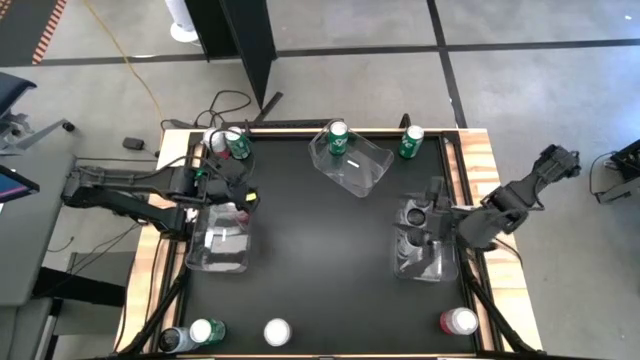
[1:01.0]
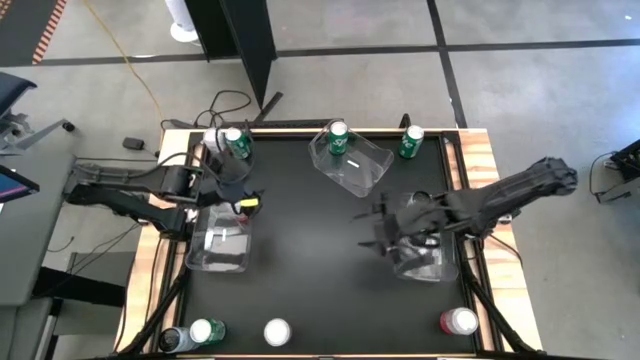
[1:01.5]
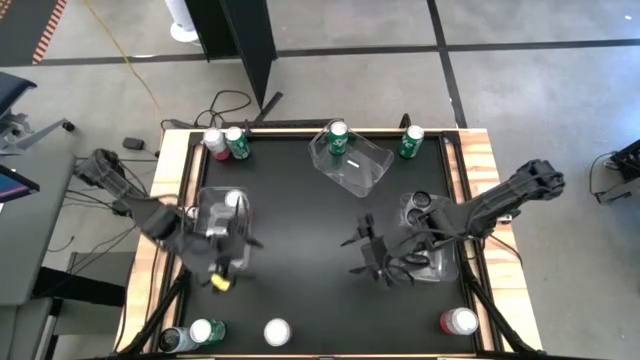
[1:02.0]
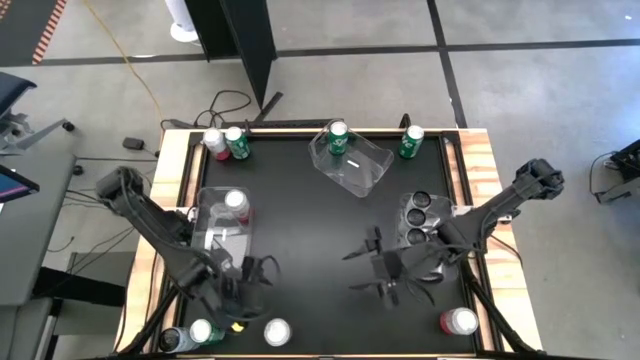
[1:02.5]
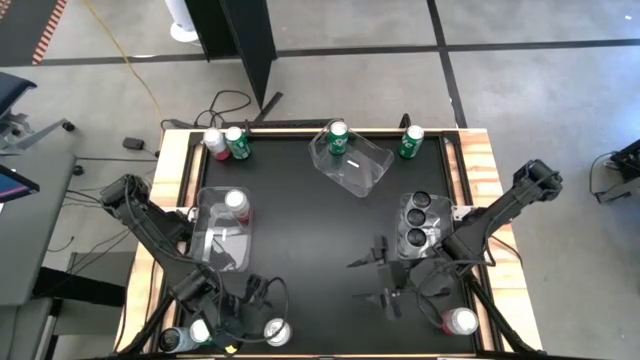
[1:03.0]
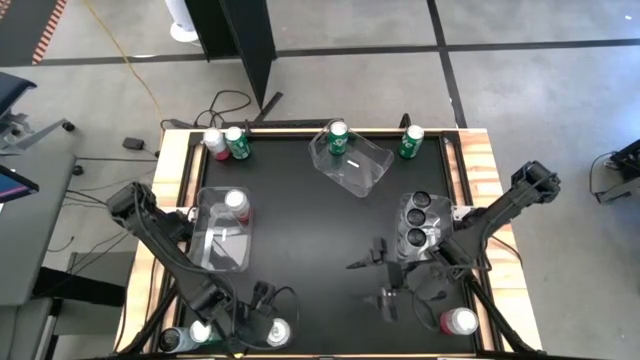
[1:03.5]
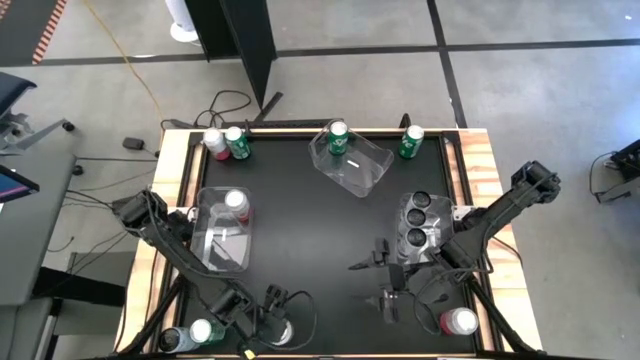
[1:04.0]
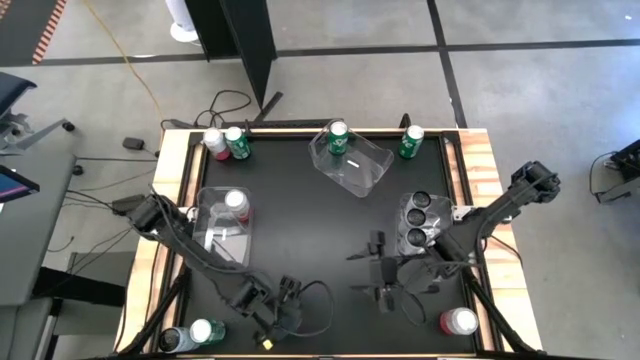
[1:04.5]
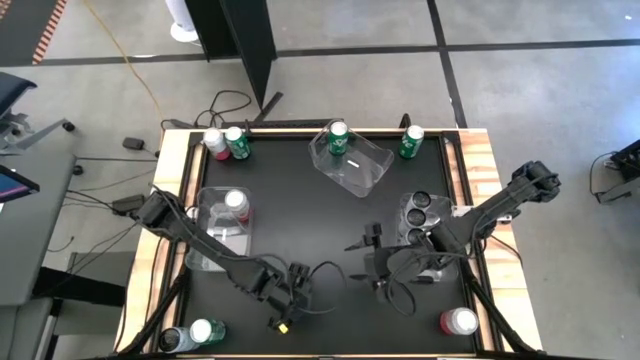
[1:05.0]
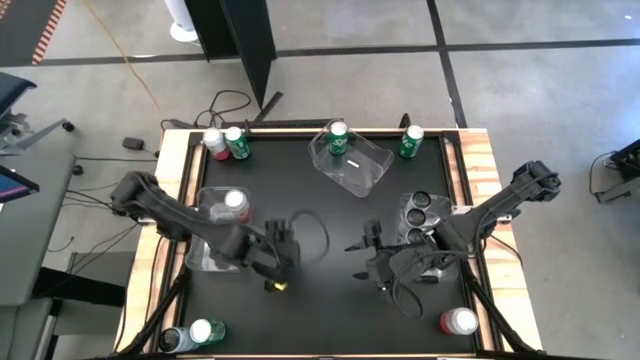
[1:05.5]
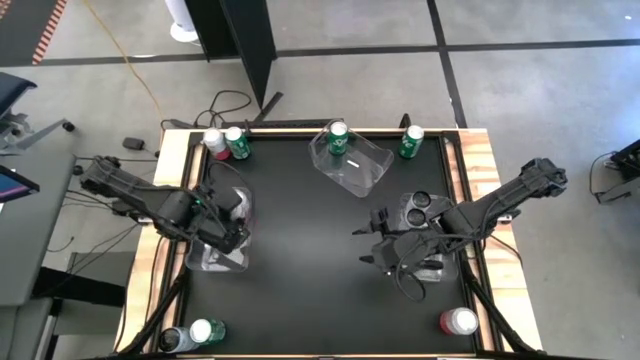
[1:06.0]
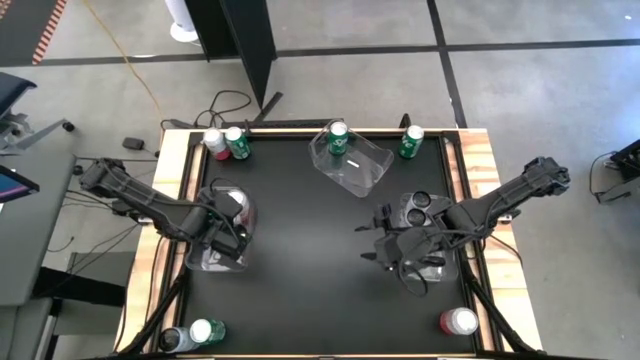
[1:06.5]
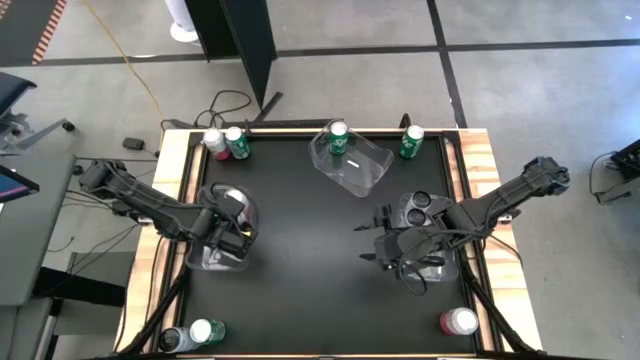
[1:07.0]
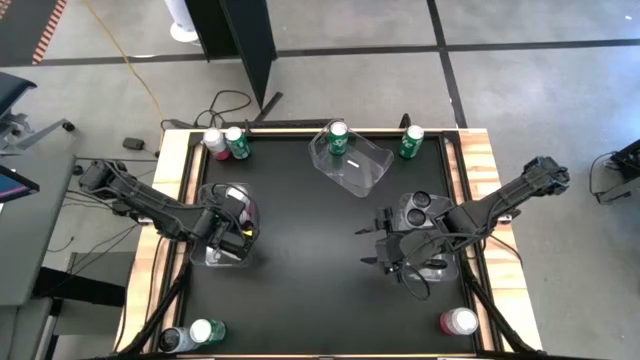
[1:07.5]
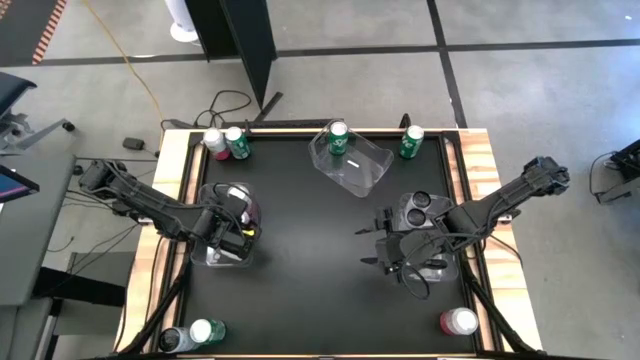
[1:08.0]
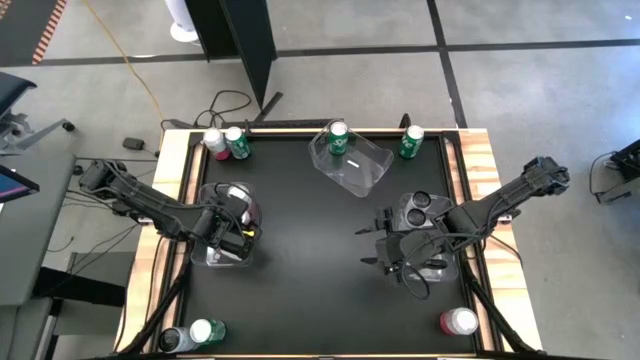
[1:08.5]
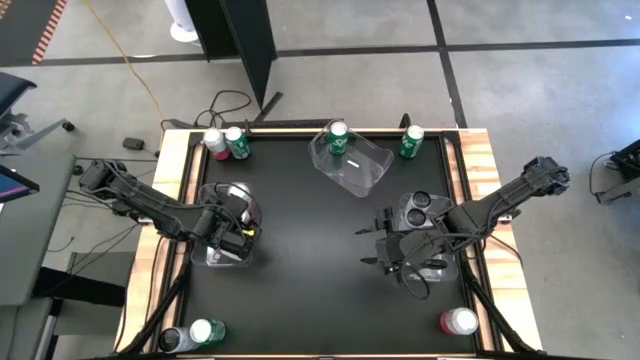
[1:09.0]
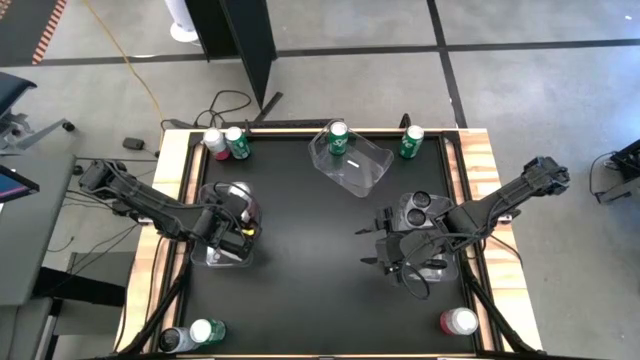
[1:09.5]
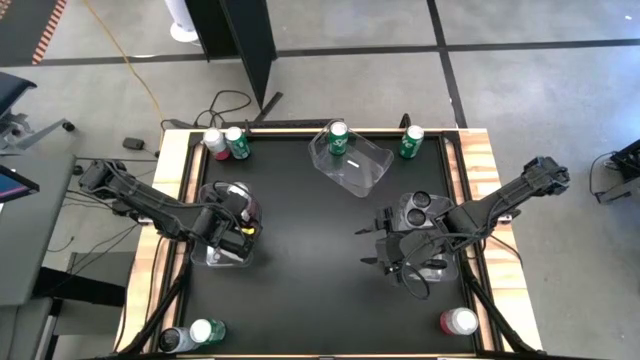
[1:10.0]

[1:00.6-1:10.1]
Task: Sort soda cans
Put the bottom left pink white soda can into the left transparent bin

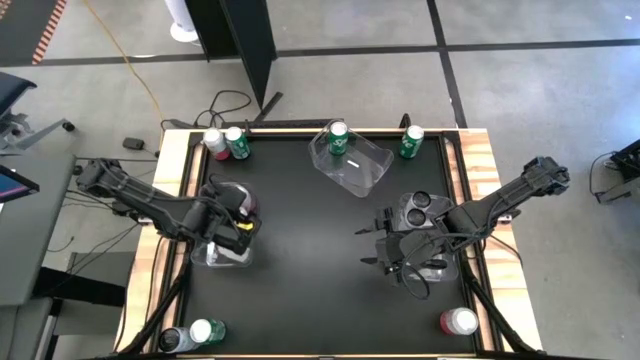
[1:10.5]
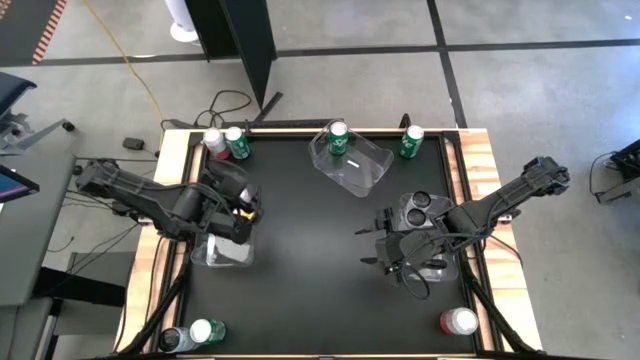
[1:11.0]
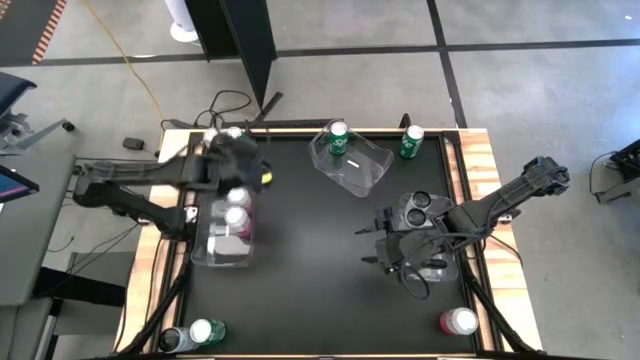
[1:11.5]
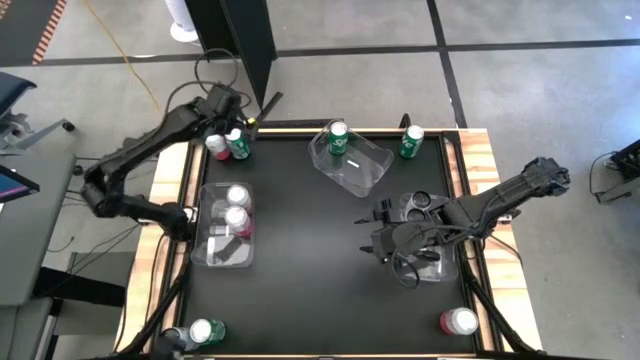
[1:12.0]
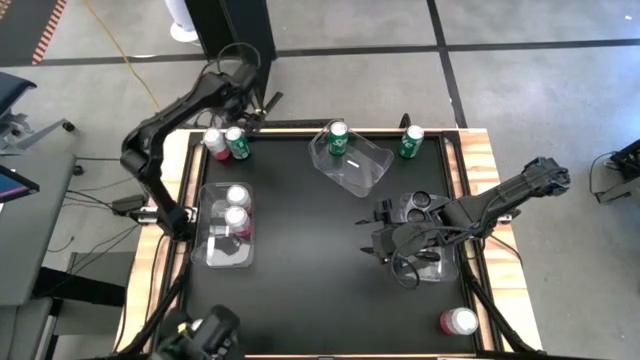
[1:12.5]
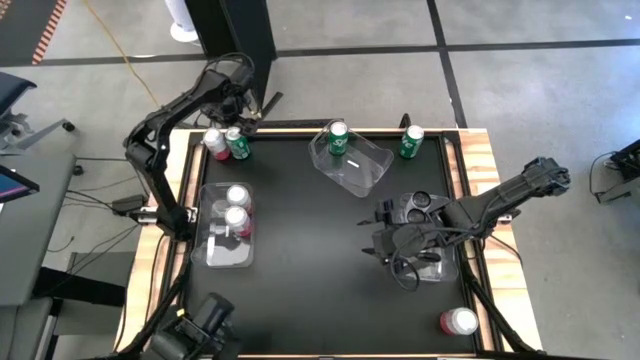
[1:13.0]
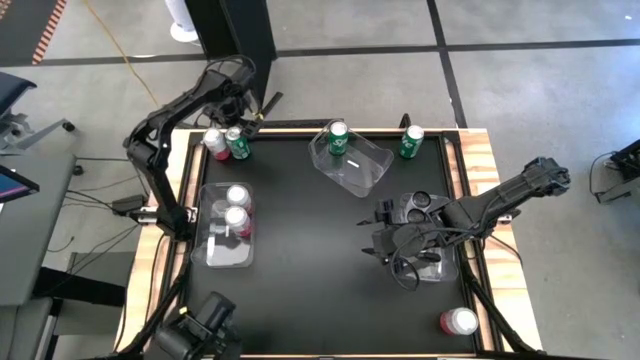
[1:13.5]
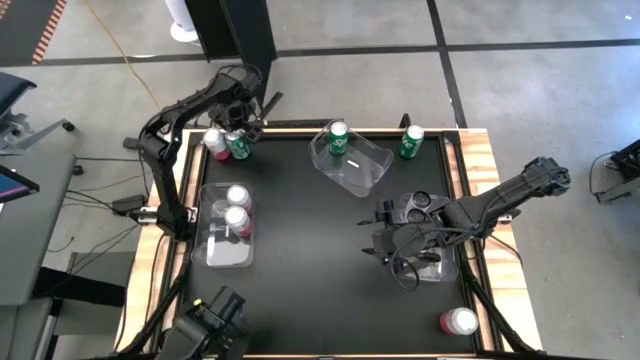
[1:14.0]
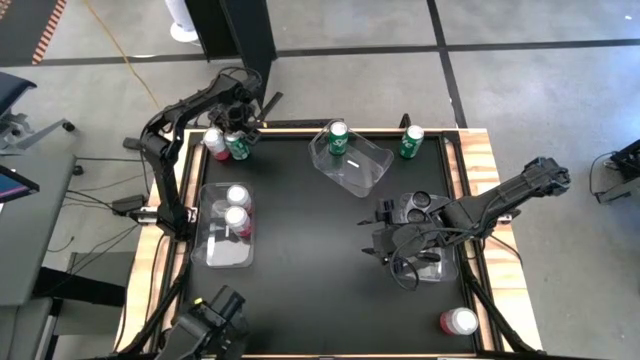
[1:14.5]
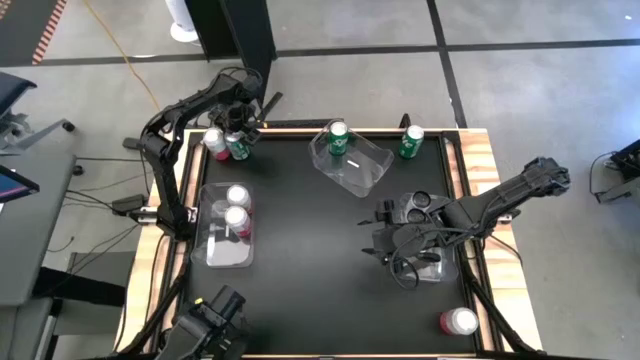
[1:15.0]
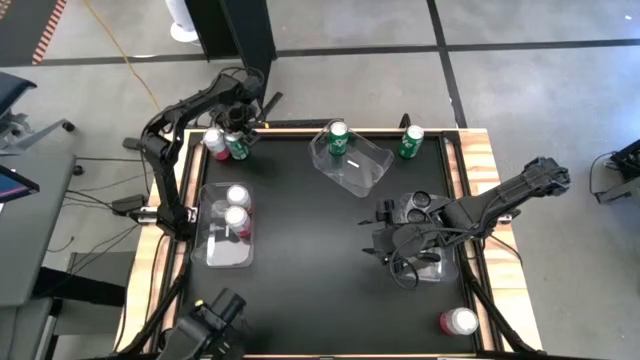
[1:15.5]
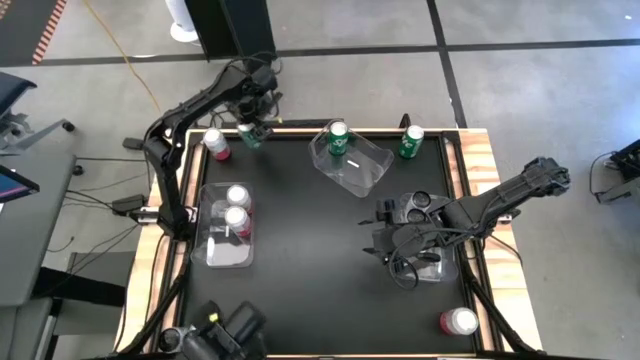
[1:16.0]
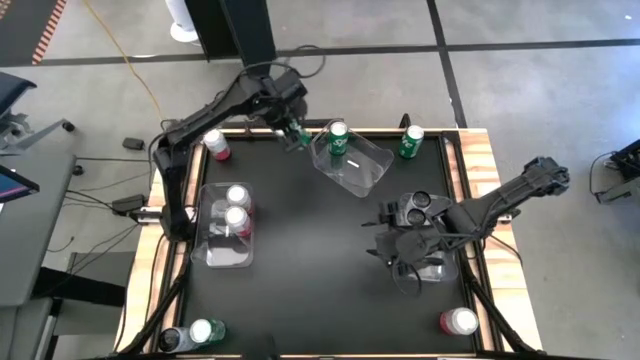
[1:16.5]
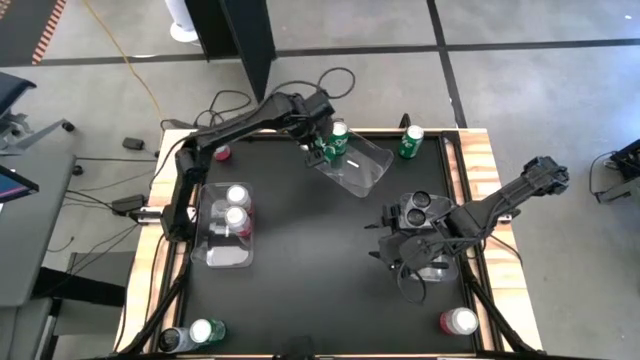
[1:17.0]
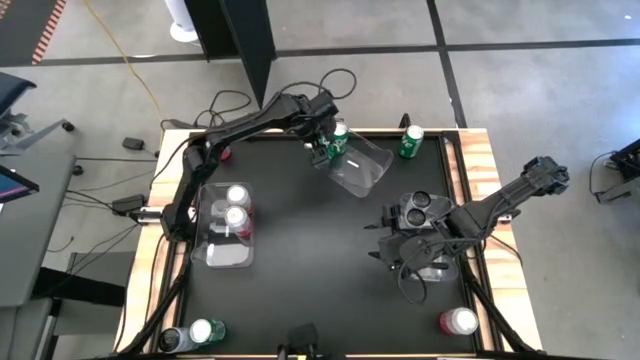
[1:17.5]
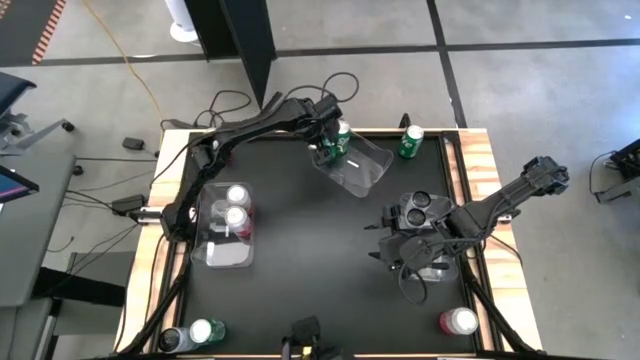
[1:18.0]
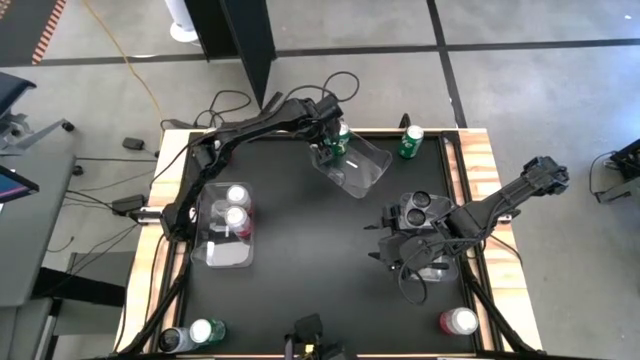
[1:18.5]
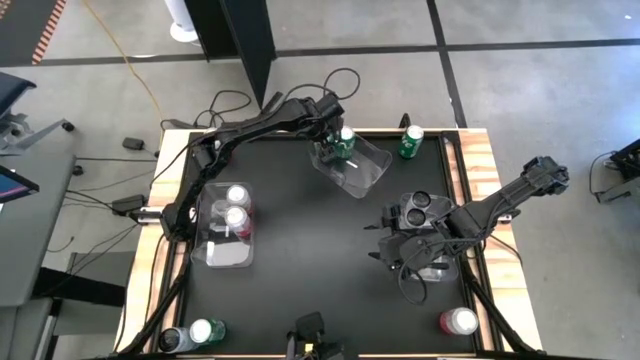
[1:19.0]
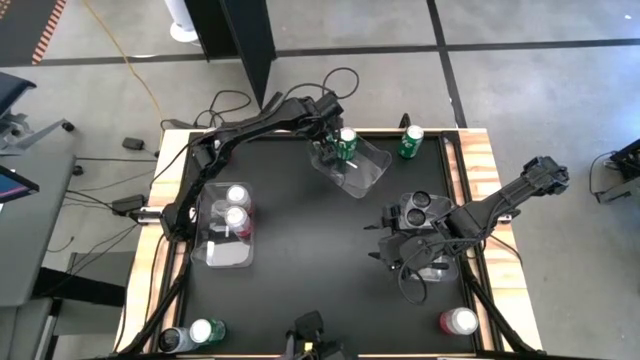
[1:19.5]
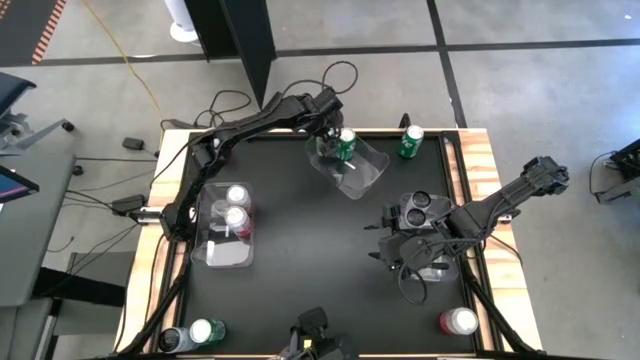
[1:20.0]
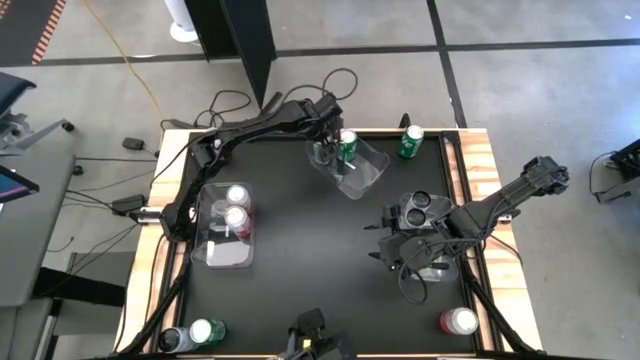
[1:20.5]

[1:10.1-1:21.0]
Put the left green soda can into the middle transparent bin

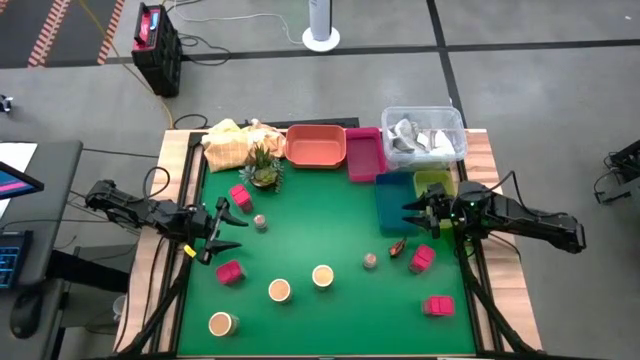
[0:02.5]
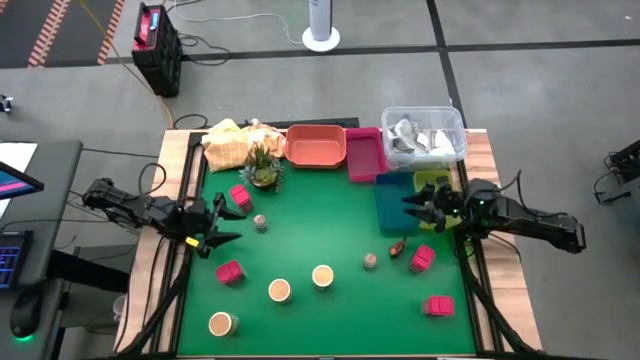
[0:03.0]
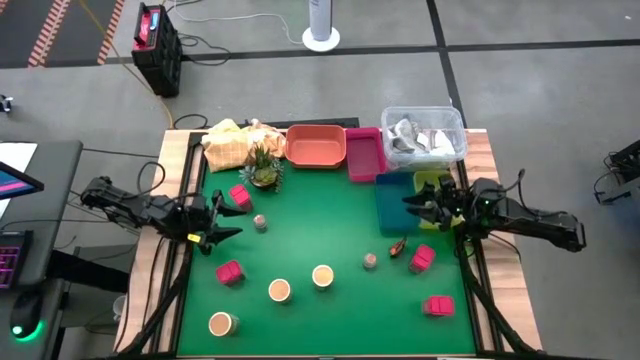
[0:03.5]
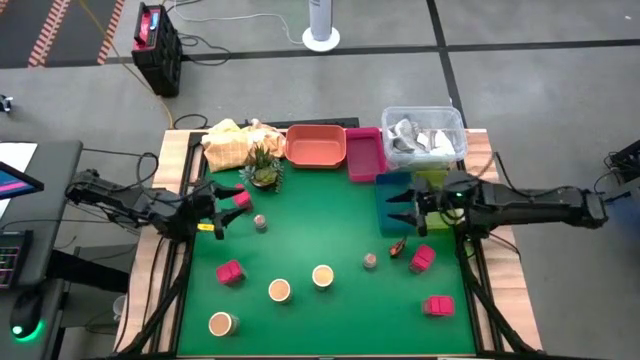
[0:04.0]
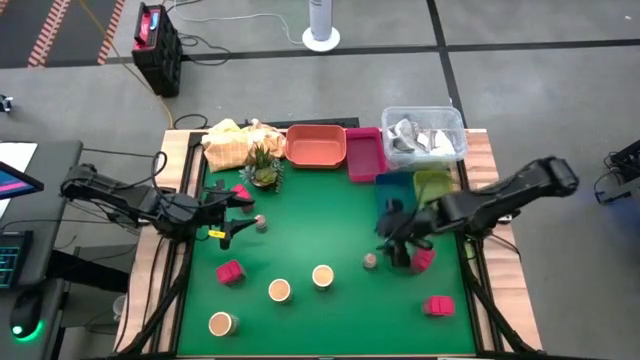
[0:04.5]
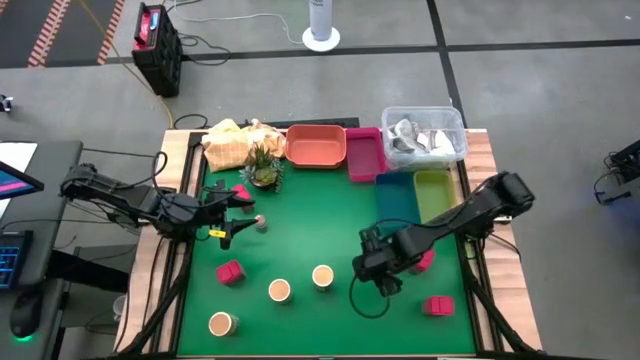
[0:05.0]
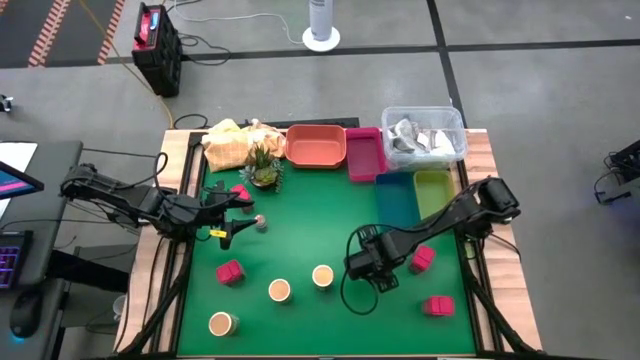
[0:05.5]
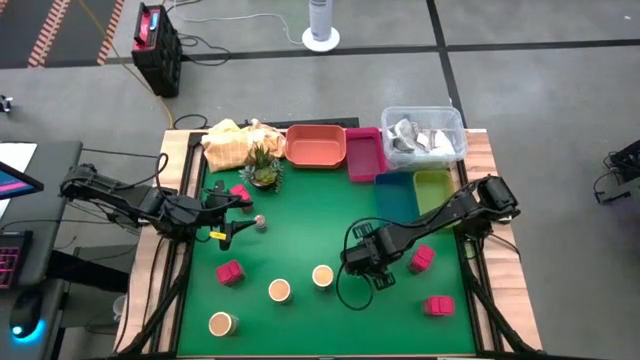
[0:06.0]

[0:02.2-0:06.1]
Task: Sort spices by type
Put the brown seasoning bottle into the blue bin
